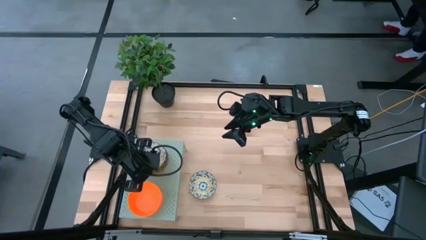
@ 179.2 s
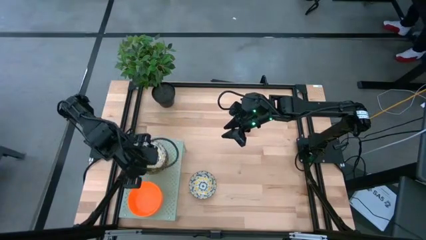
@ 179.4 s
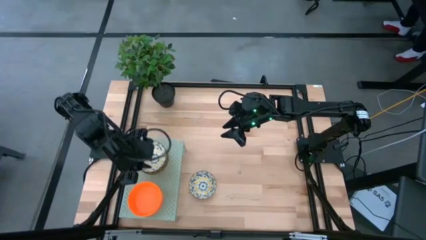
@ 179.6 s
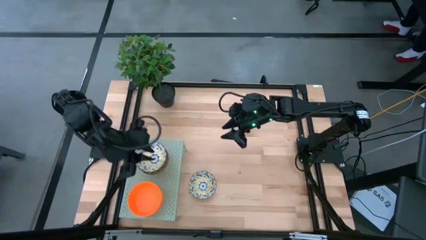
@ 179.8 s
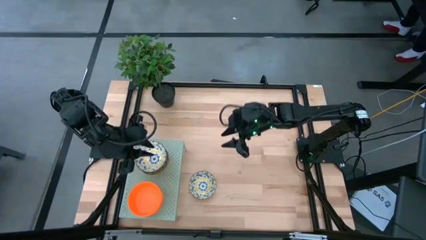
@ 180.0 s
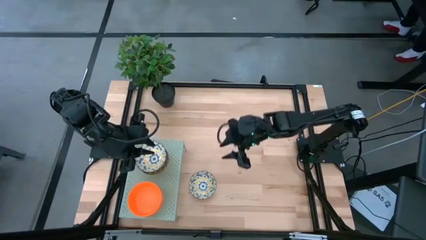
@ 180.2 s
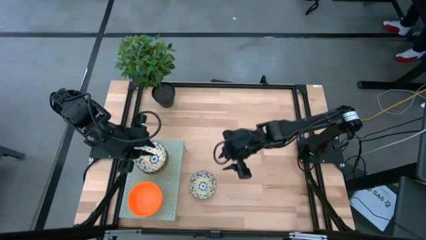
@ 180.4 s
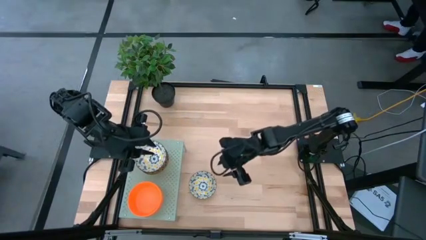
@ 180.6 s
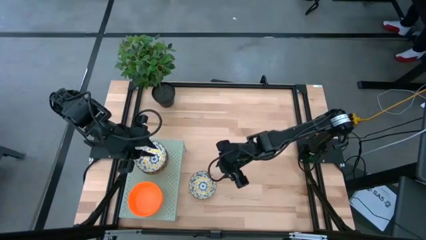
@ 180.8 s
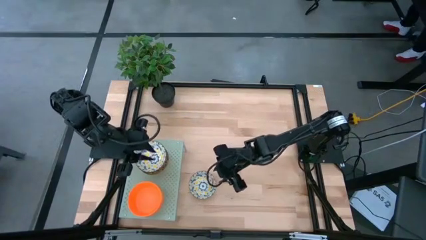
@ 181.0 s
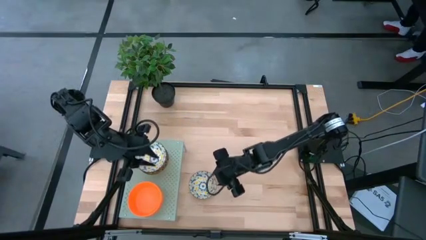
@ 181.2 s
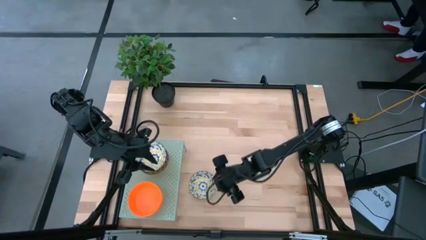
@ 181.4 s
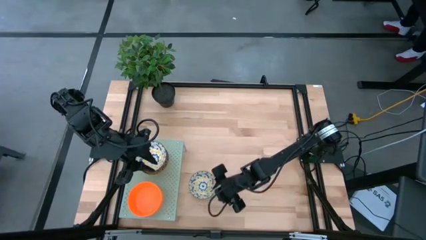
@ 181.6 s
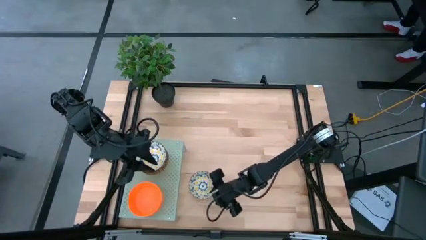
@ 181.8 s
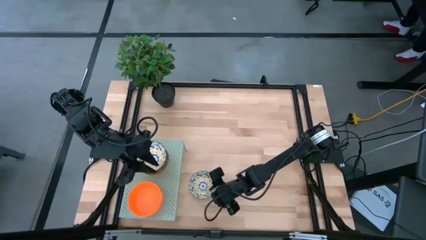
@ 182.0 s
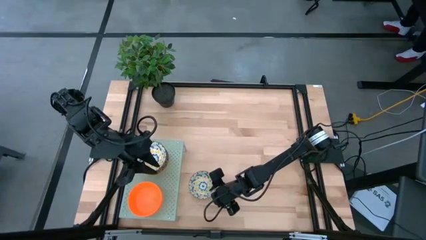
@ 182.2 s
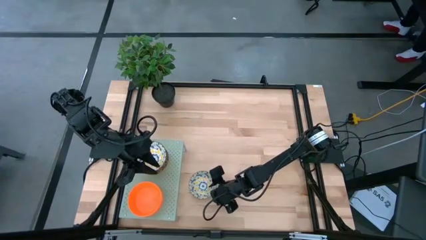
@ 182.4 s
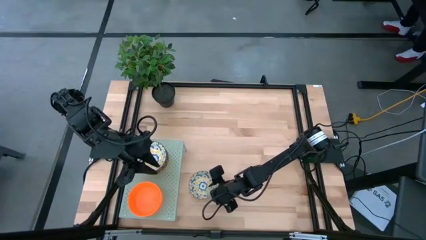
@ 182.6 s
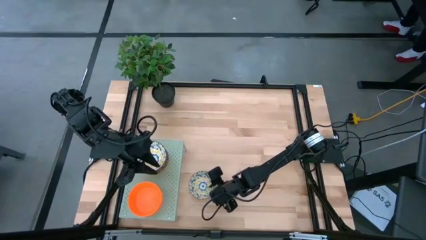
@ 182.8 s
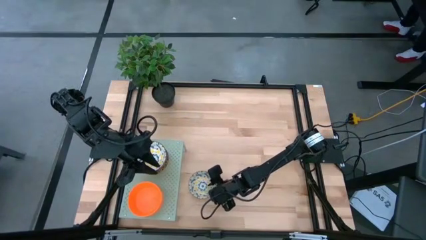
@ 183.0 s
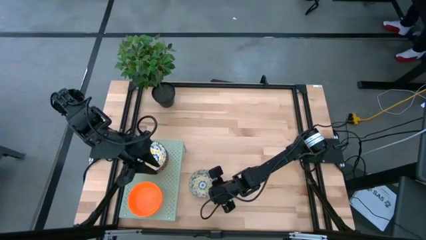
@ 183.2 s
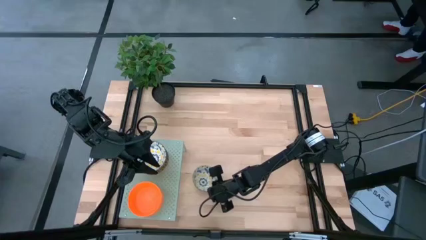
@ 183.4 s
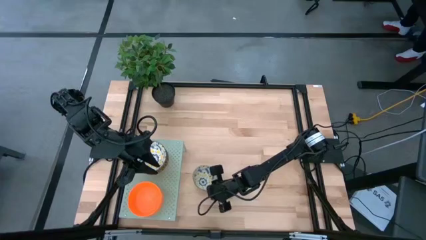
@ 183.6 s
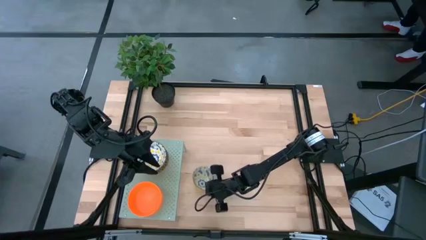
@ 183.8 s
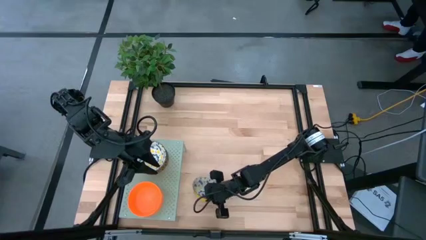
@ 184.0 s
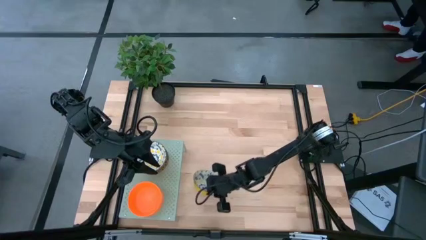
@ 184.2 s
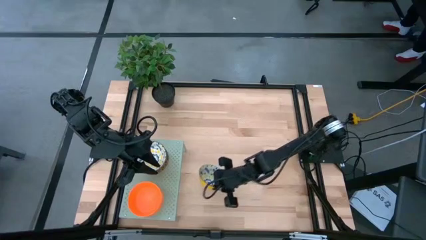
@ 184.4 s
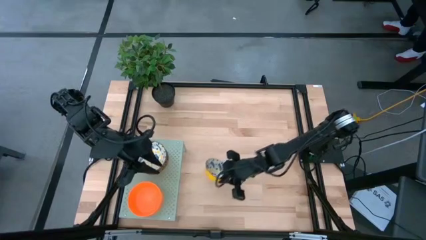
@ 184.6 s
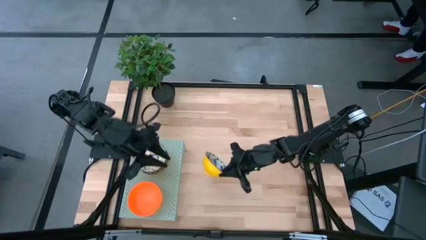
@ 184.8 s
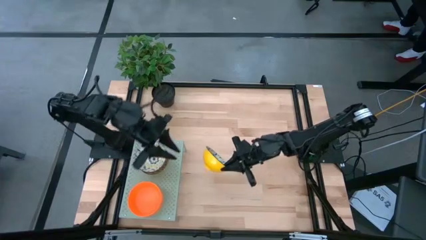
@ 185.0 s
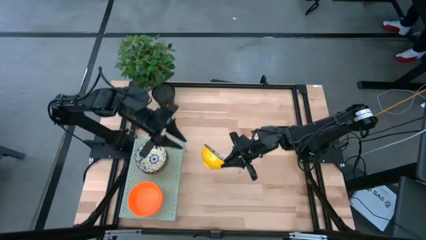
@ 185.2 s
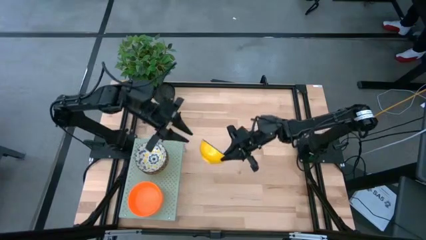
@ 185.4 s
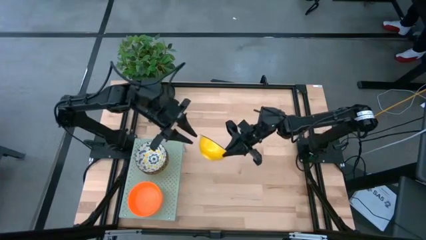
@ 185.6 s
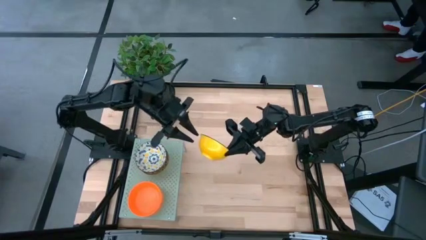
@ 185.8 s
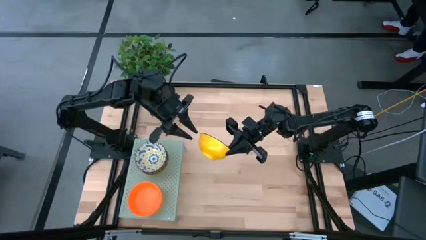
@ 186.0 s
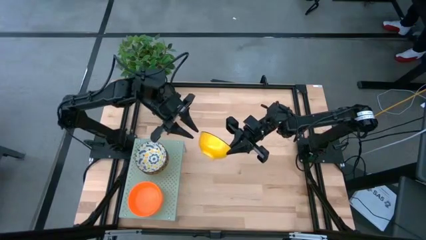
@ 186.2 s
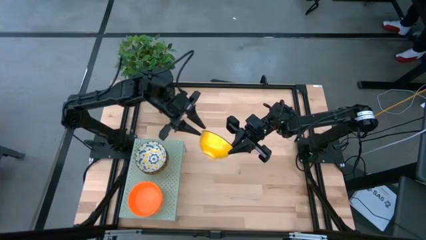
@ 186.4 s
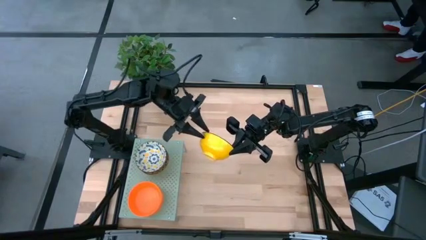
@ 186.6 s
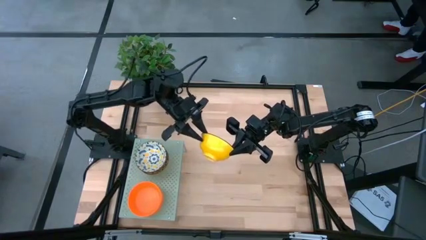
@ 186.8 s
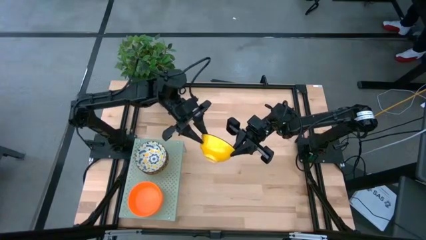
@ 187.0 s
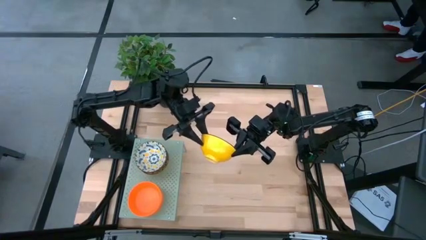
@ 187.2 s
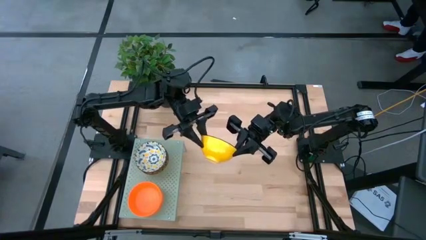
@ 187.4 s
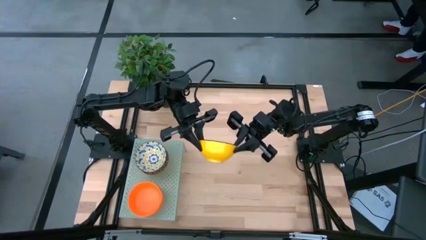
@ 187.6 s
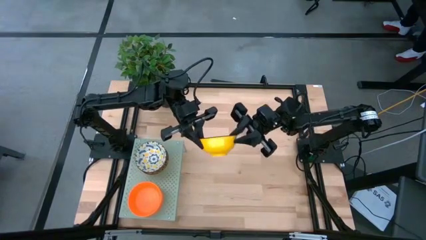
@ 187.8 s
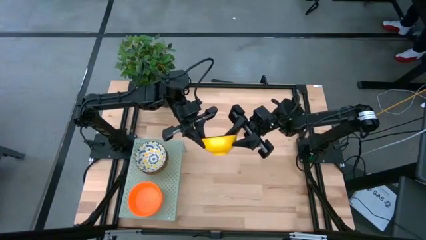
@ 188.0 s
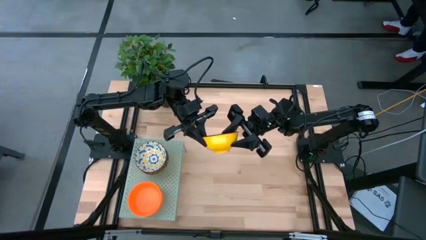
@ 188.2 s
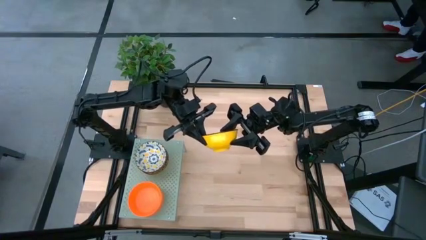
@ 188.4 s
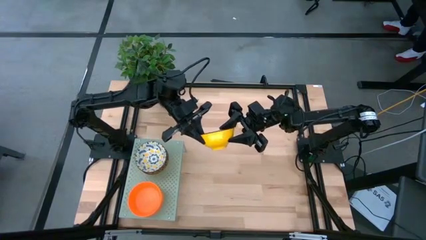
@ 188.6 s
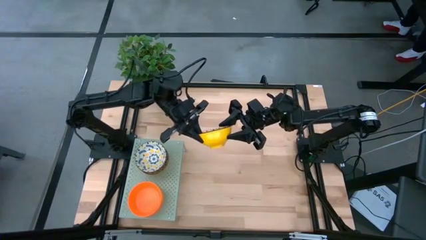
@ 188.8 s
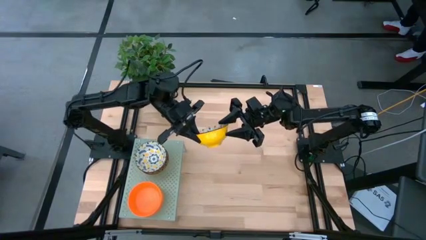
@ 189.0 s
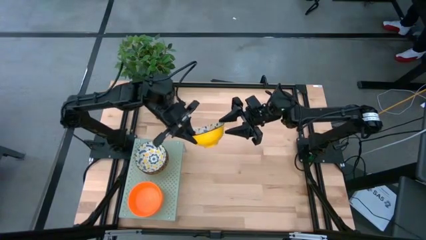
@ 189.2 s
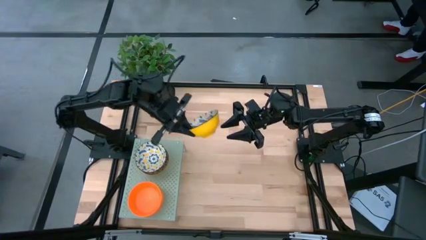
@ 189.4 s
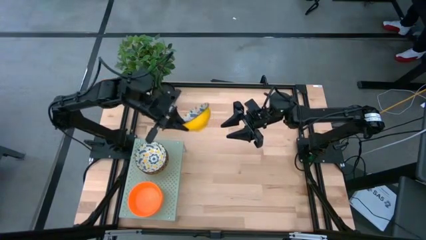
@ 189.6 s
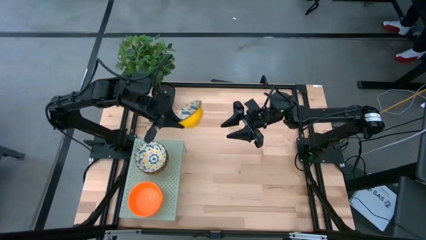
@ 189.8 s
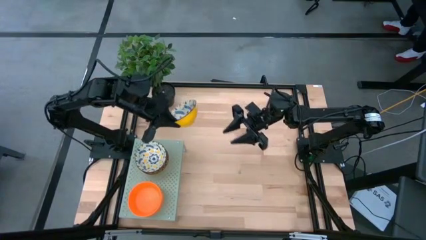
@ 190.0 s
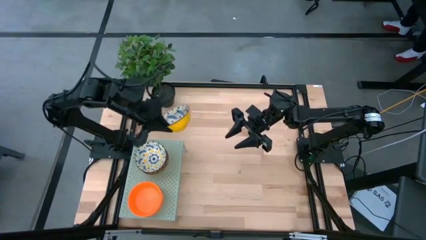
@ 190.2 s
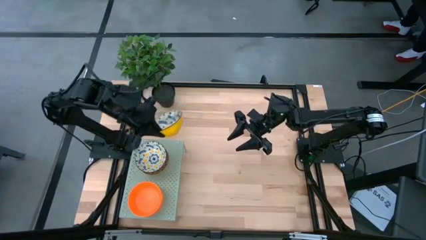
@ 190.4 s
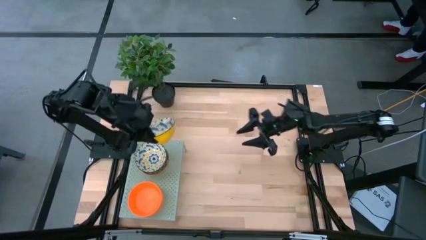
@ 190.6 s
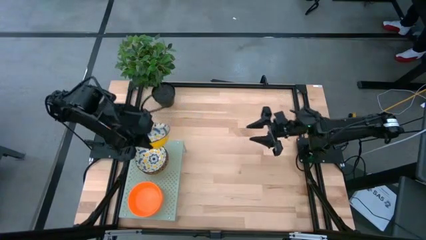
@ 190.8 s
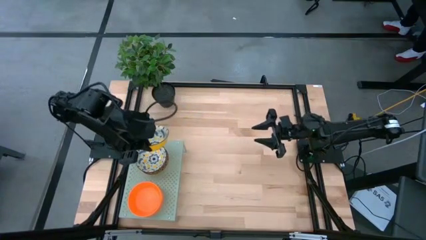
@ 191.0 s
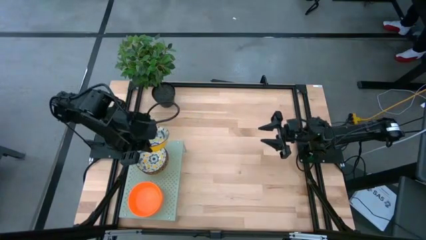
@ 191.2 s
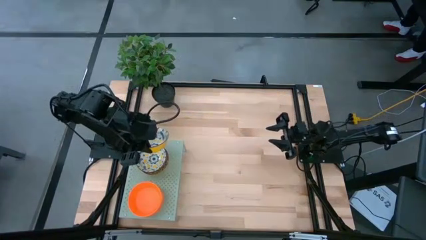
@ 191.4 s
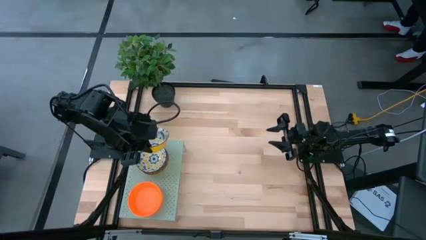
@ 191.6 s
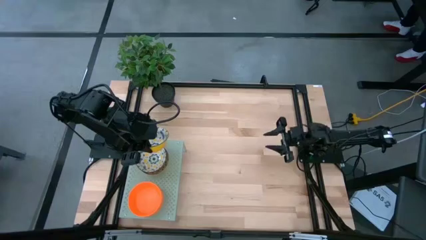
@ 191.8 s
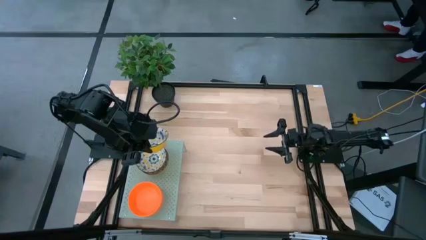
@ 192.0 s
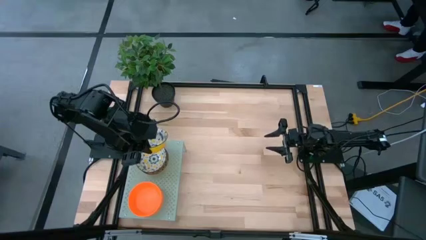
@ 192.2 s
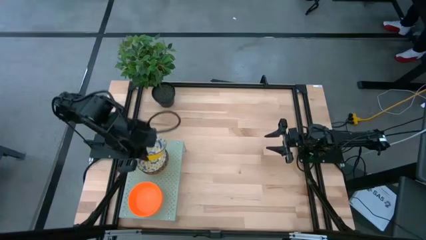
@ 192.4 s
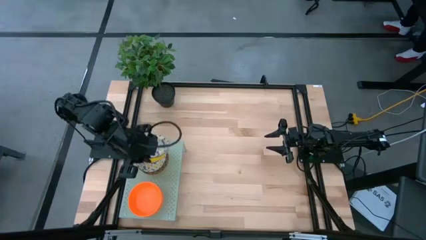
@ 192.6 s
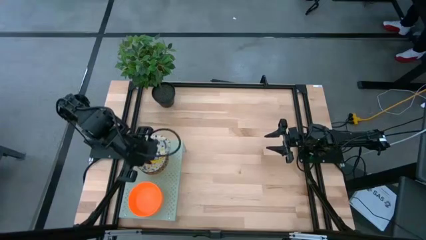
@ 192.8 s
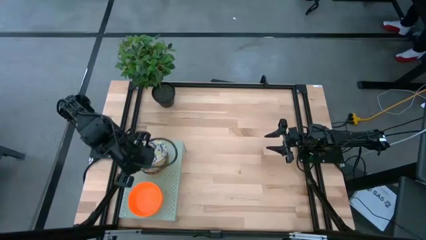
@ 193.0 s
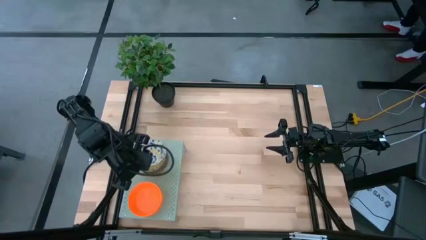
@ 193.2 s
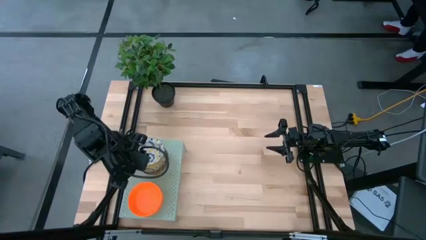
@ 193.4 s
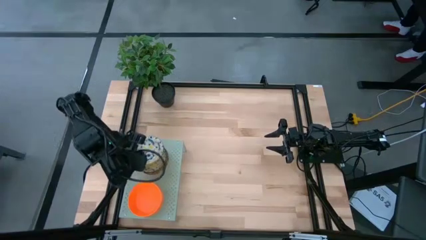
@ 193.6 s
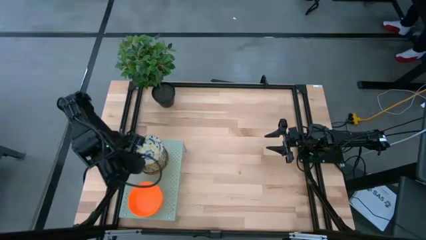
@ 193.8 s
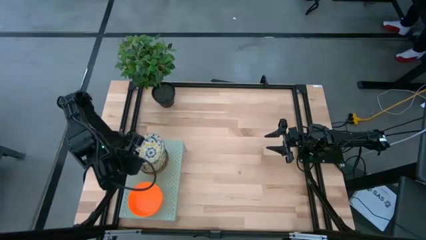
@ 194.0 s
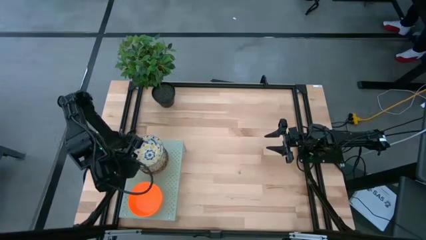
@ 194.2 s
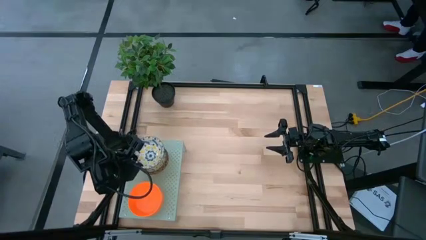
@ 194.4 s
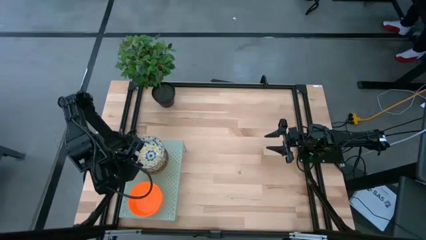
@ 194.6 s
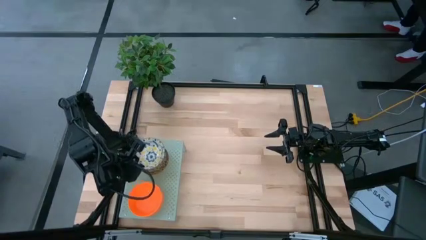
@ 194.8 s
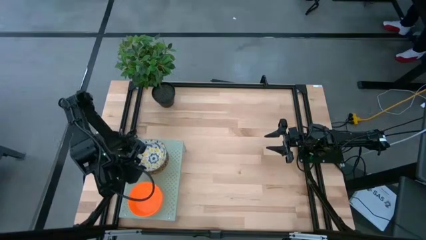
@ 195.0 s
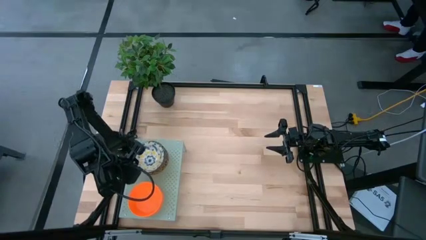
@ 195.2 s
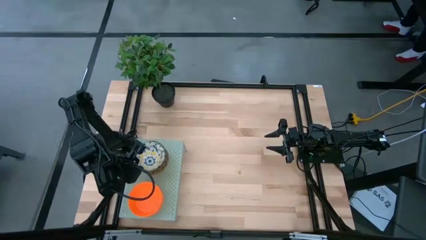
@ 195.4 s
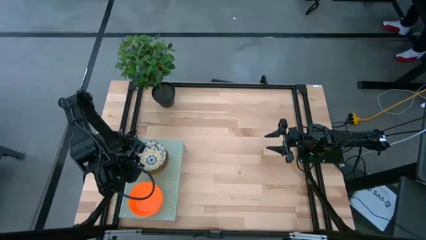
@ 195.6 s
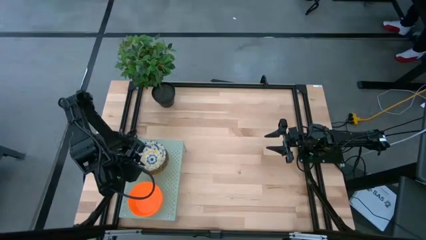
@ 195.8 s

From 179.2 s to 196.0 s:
Task: Pick & Place Mini bowls
Stack the patterned bowl on top of the patterned bowl on the shelf
